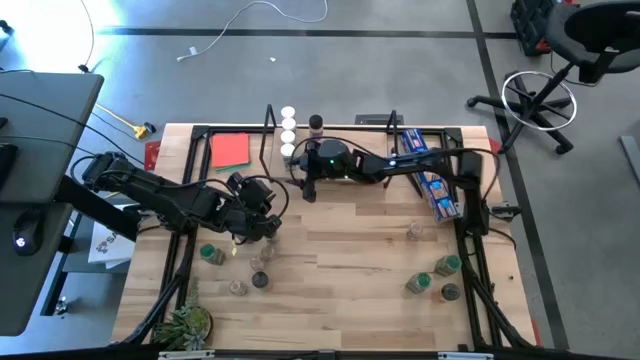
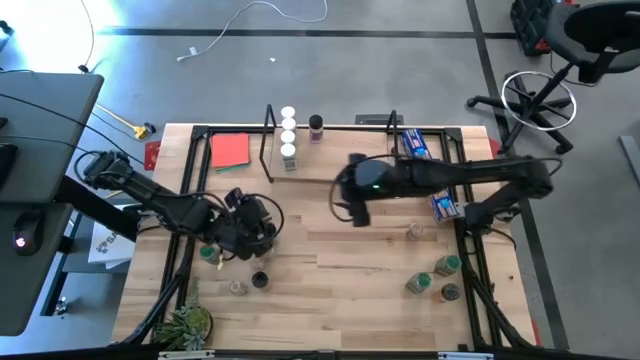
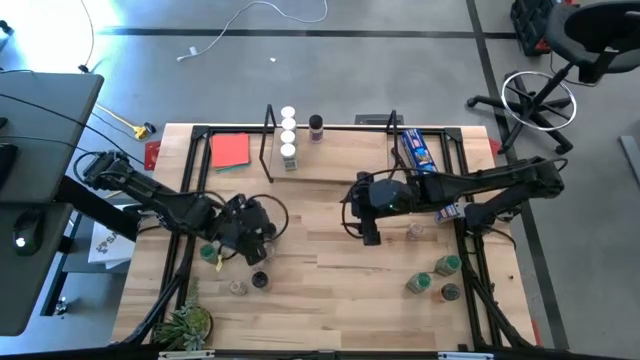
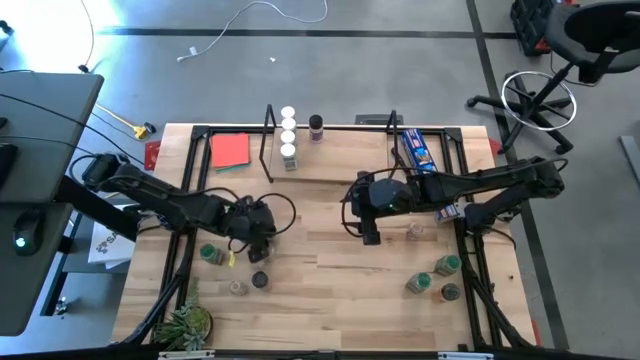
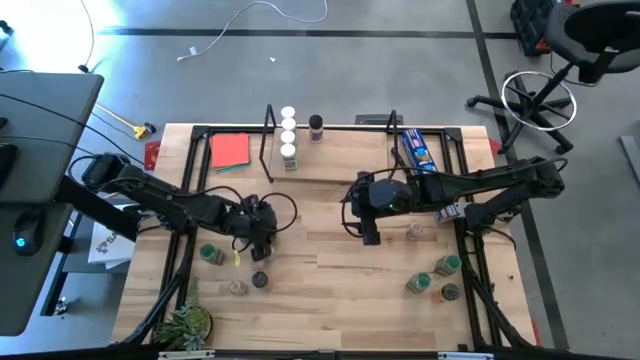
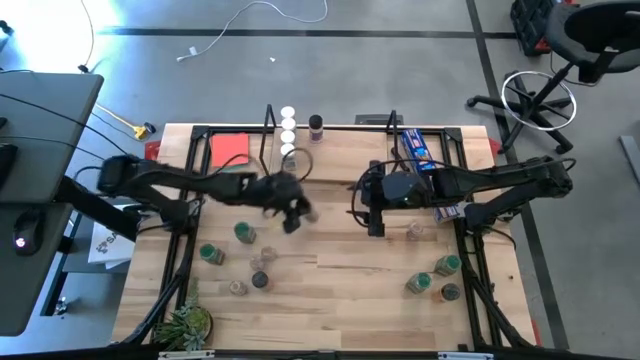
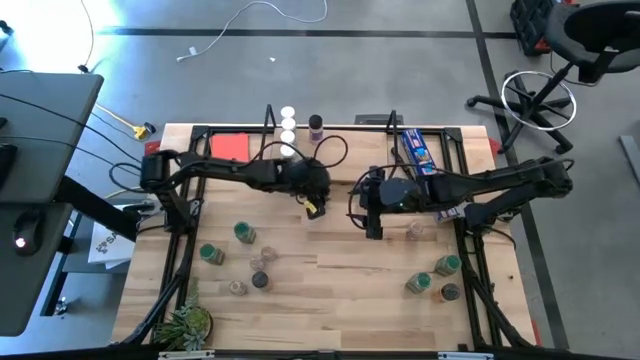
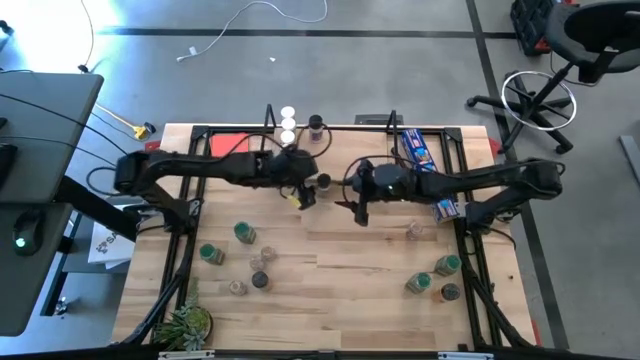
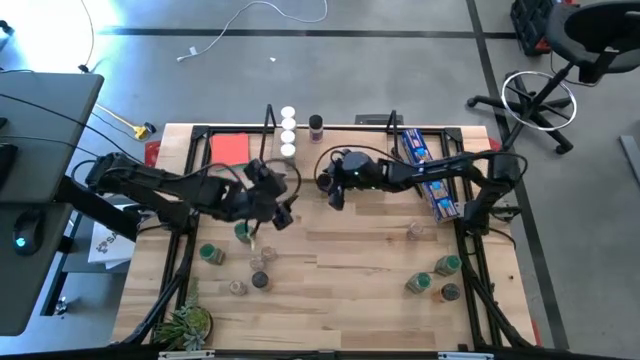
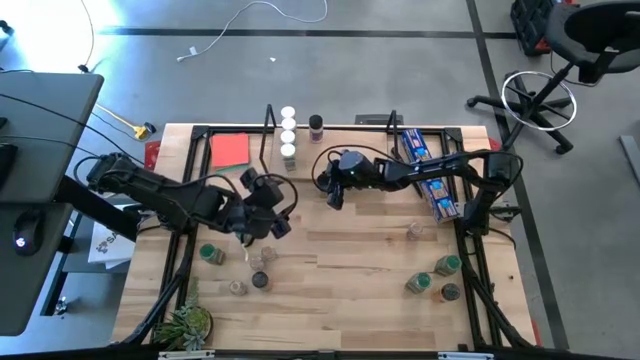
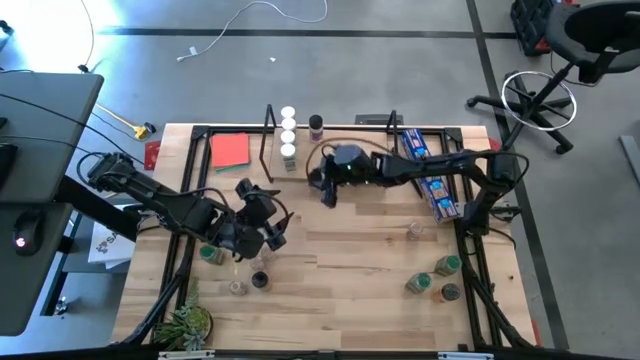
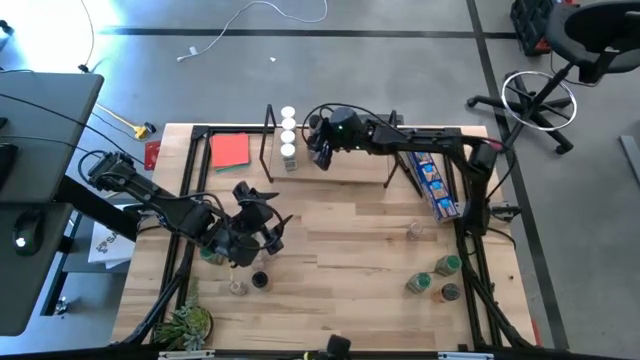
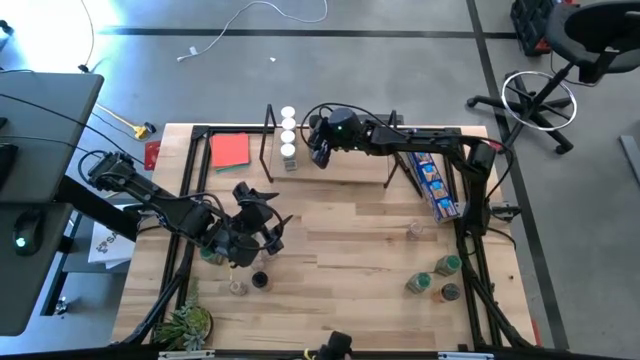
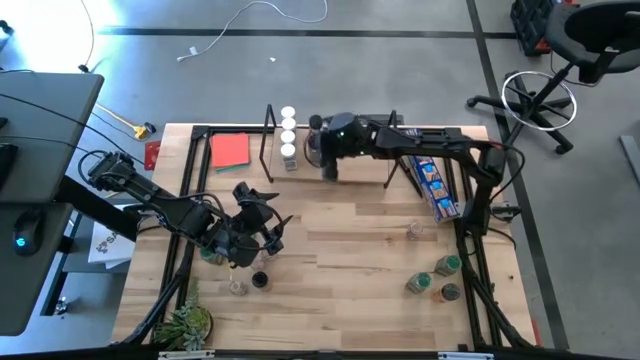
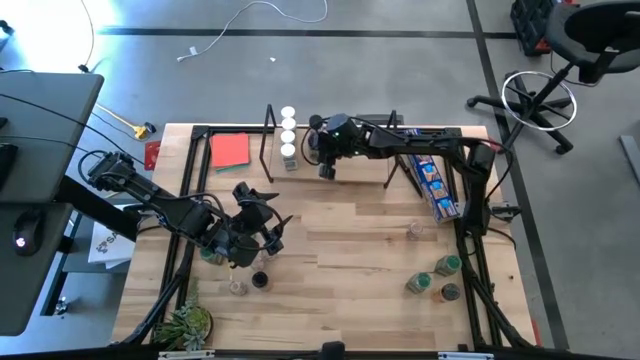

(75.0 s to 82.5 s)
Task: Shelf spices
Put the black seasoning bottle on the shelf aligned with the other black seasoning bottle

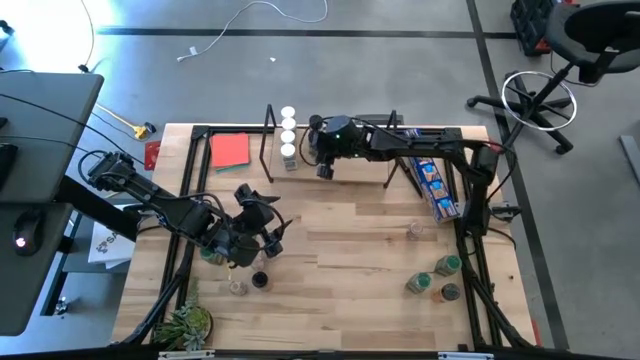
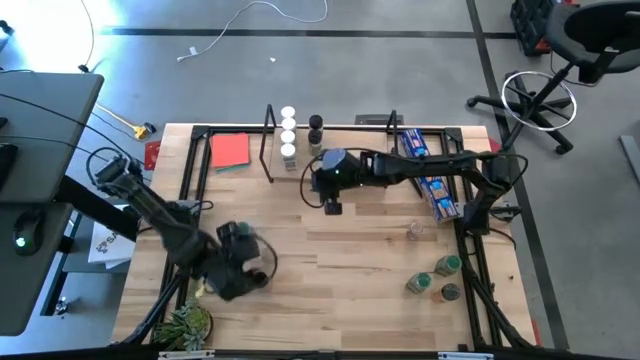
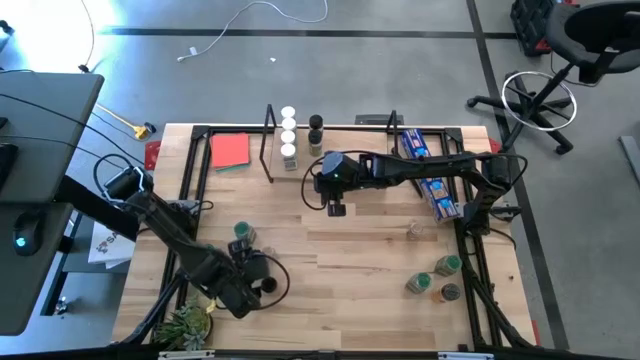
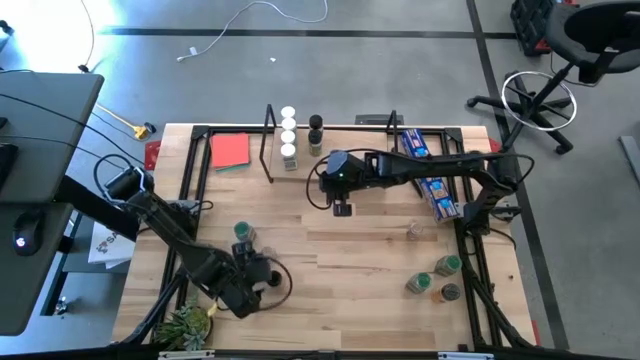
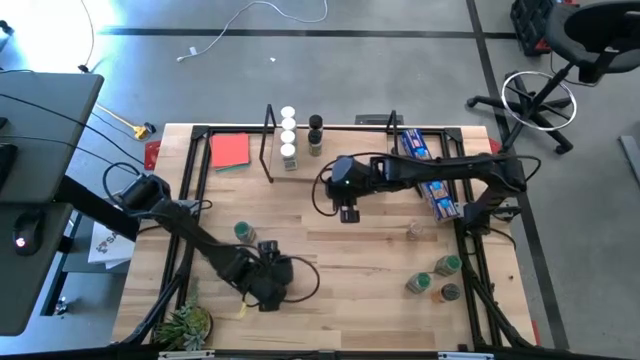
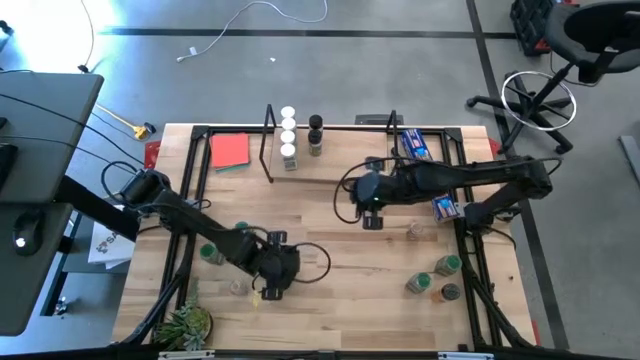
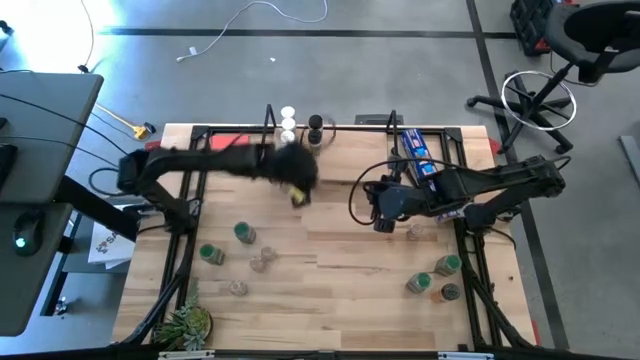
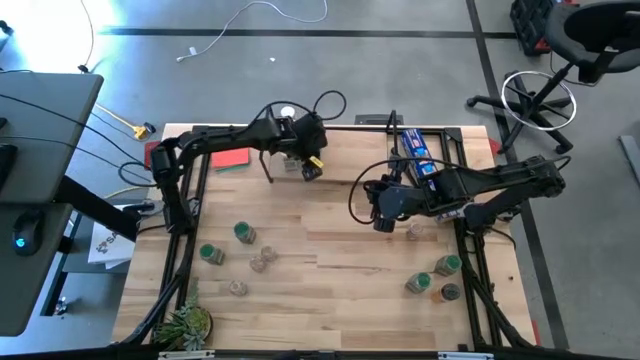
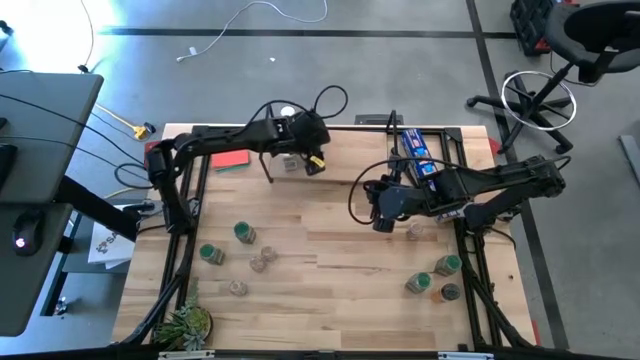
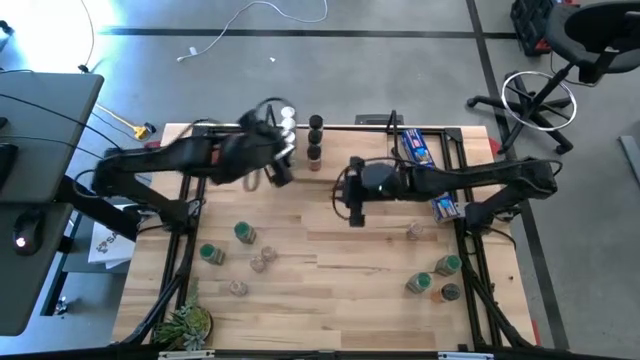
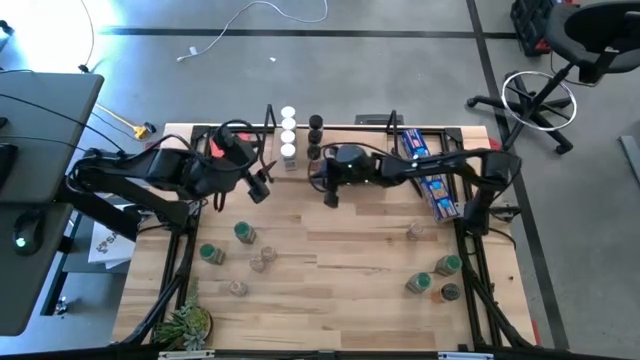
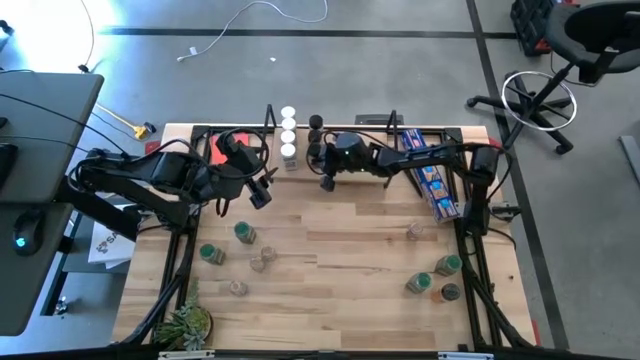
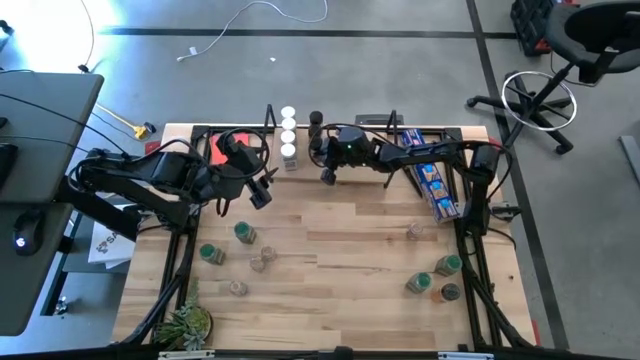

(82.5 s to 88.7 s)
Put the black seasoning bottle on the shelf aligned with the other black seasoning bottles

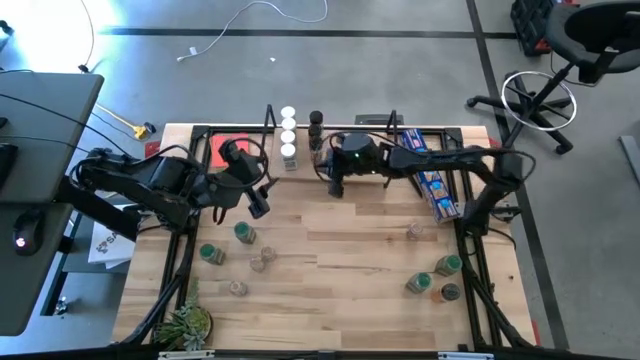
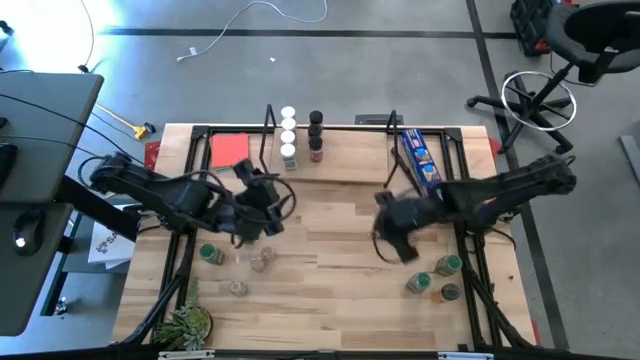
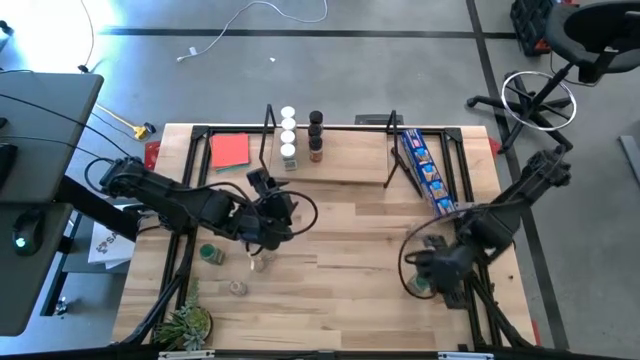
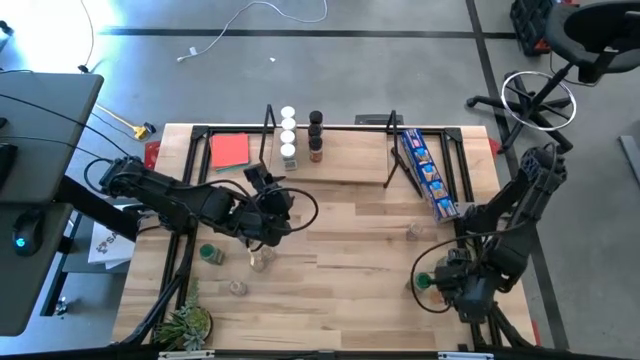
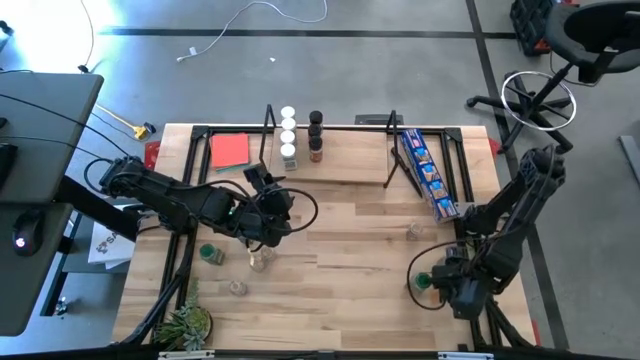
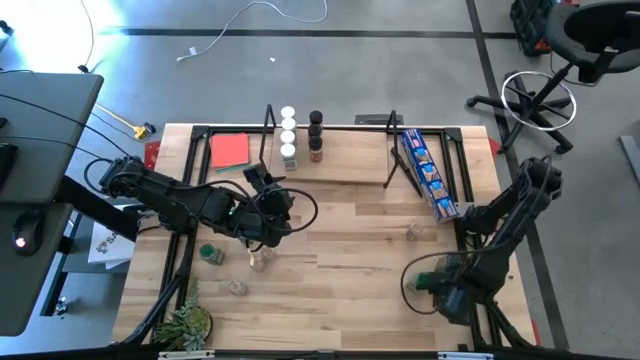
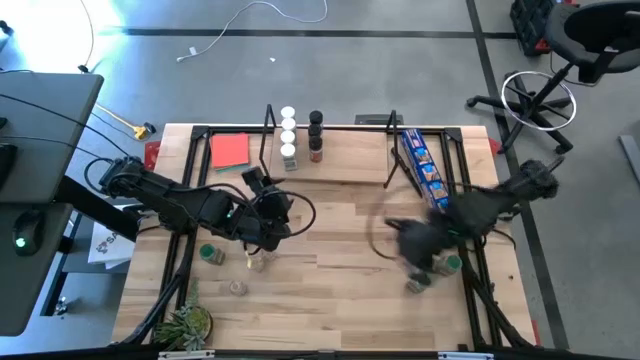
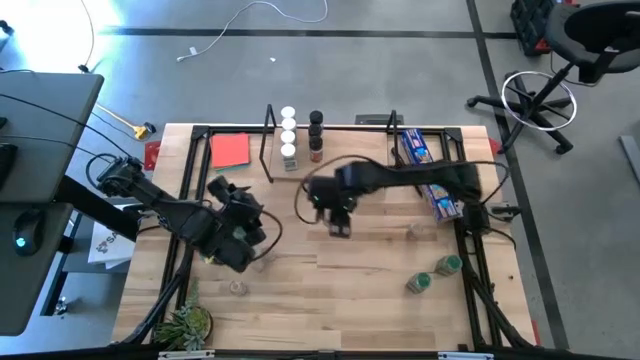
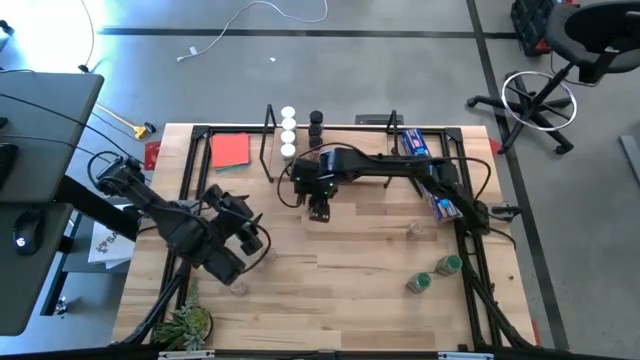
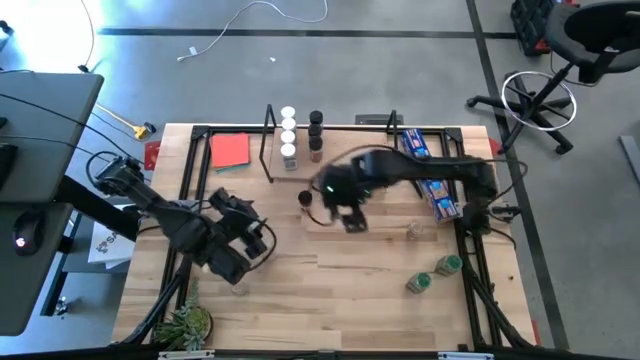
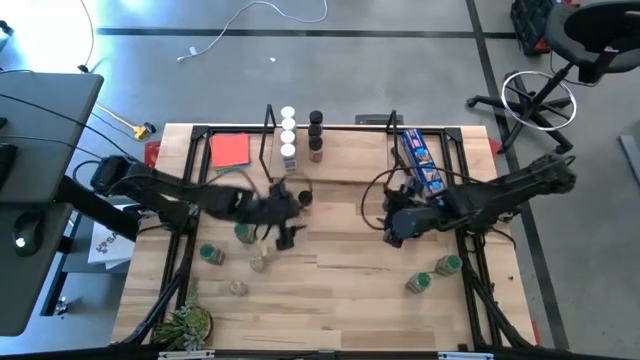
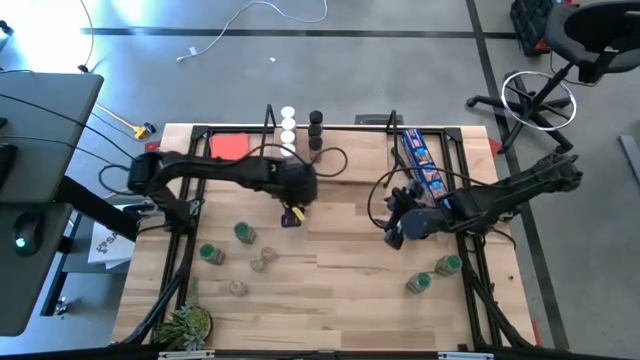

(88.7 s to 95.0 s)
Put the black seasoning bottle on the shelf aligned with the other black seasoning bottles

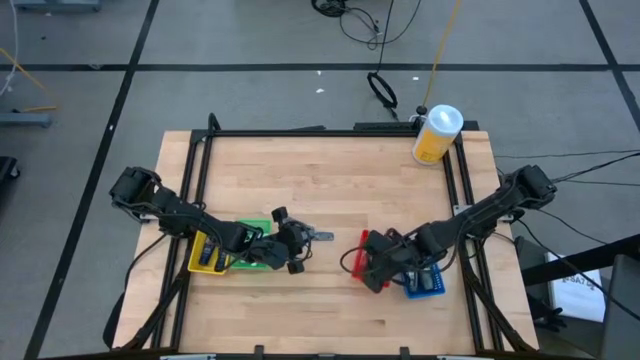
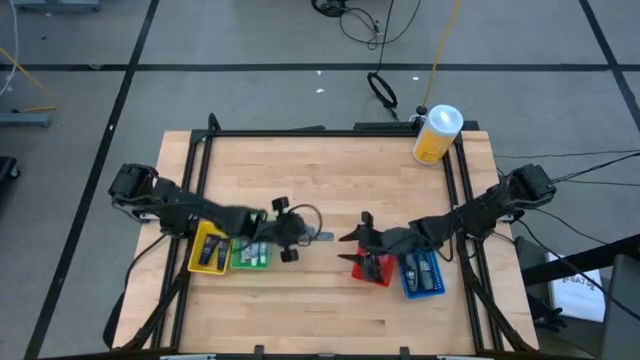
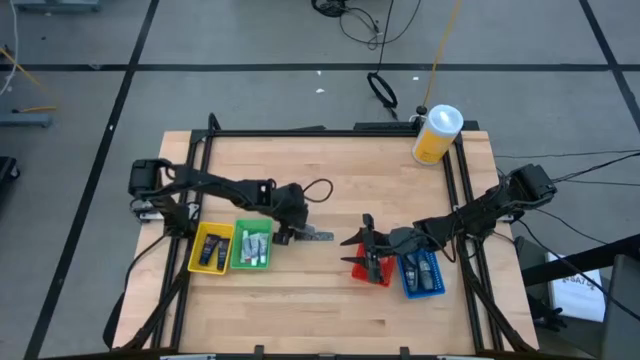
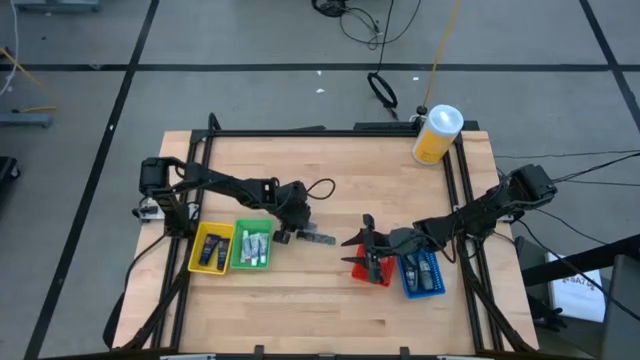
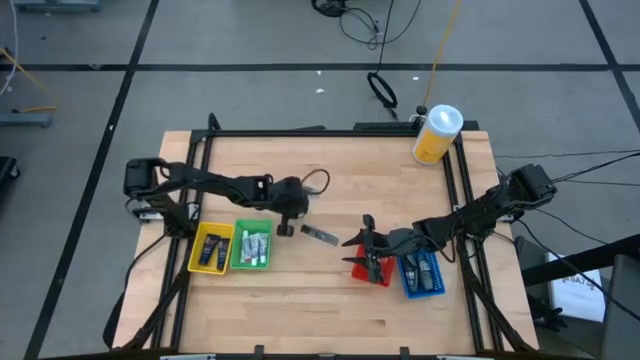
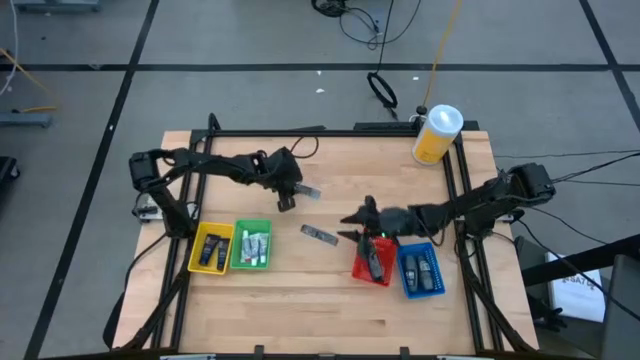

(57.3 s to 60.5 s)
Task: Pick & Place Travel size toiletries
Put the black comb into the red bin
